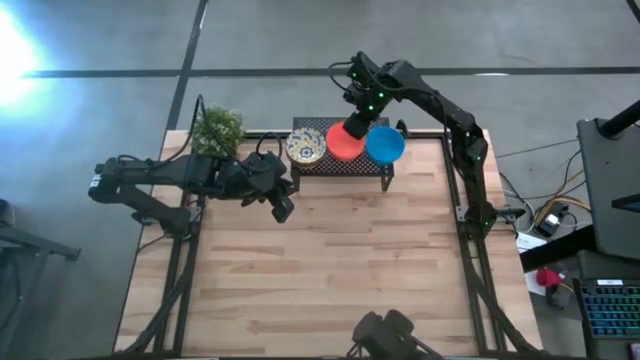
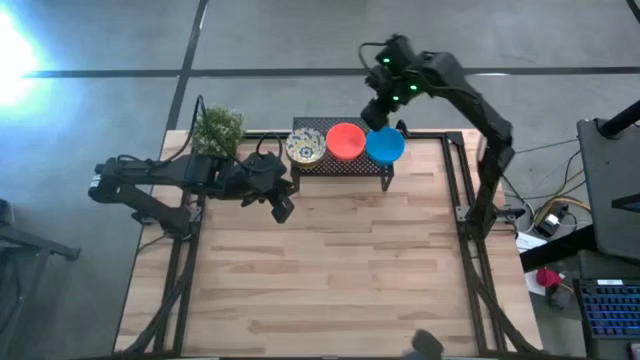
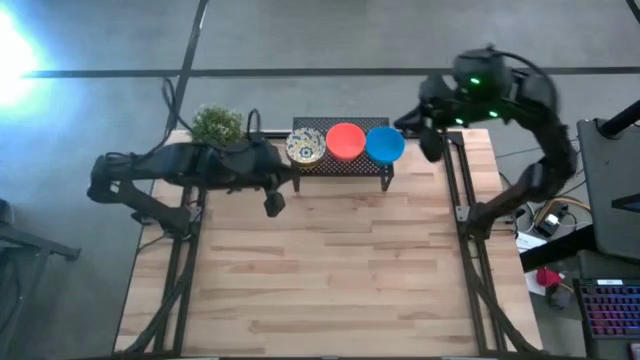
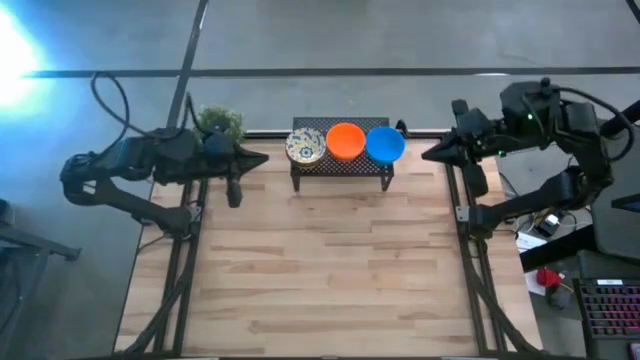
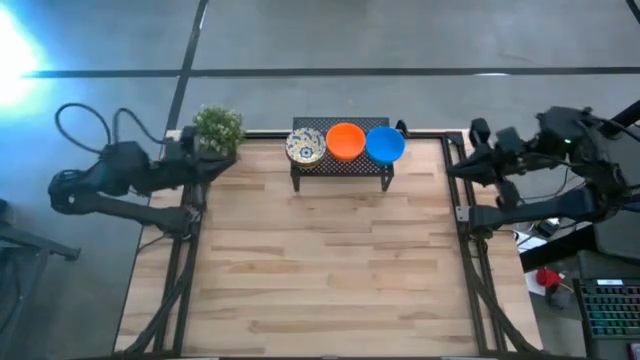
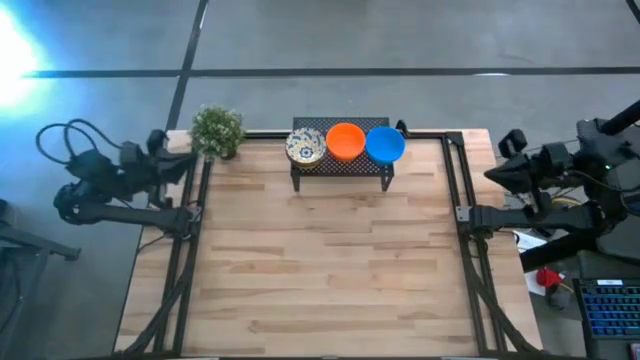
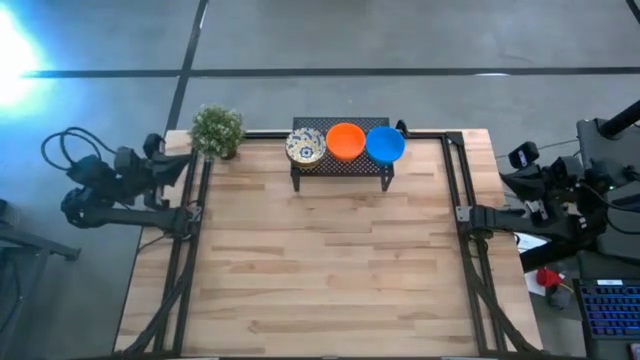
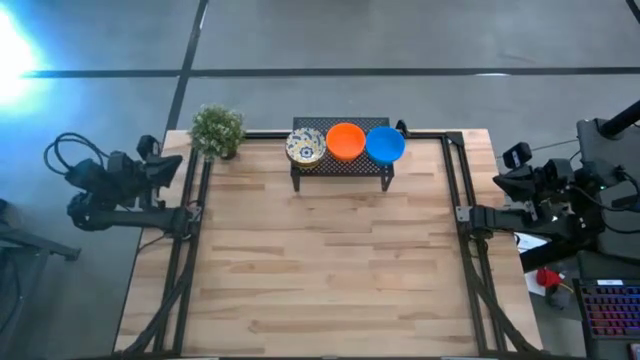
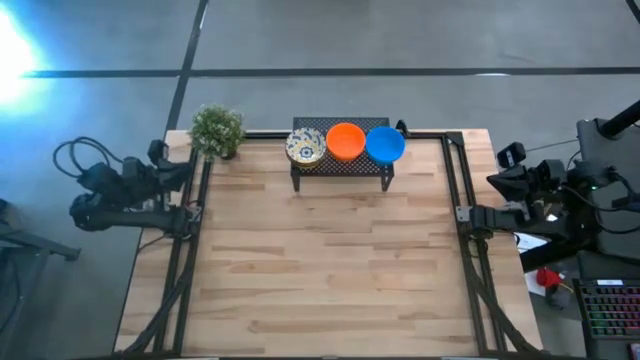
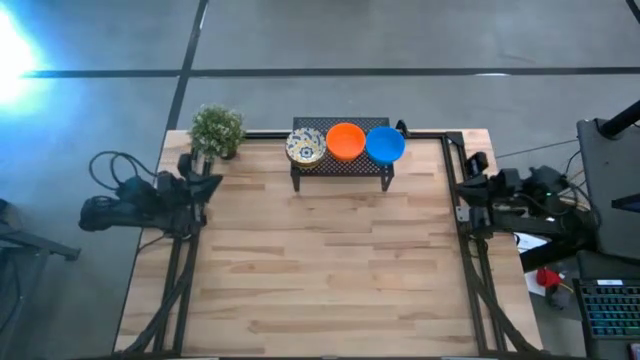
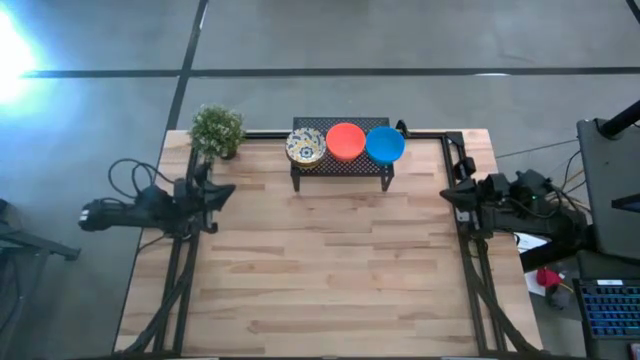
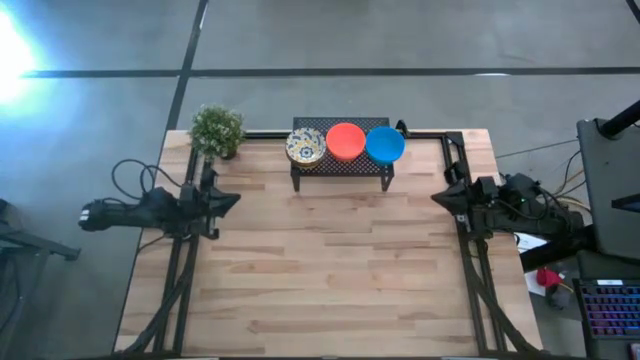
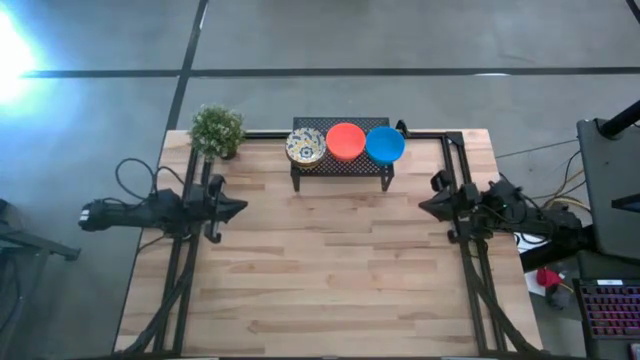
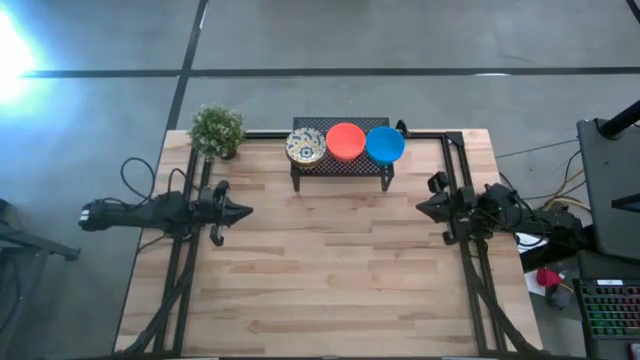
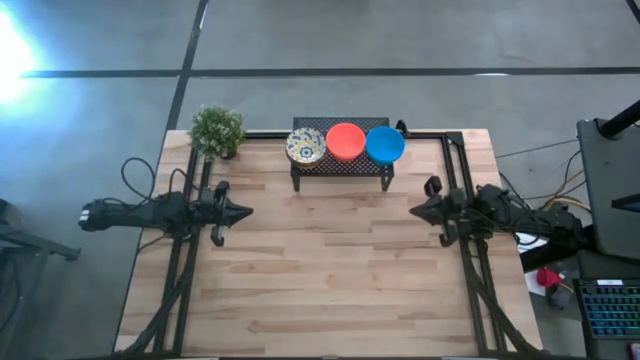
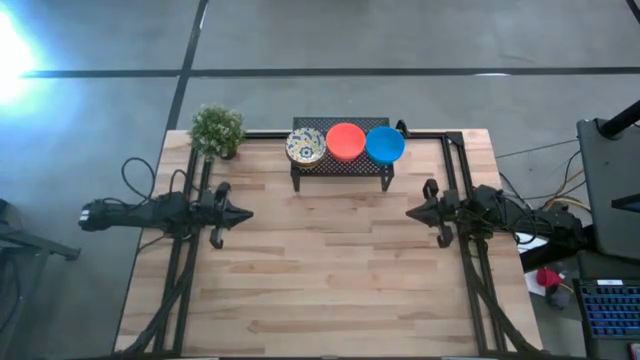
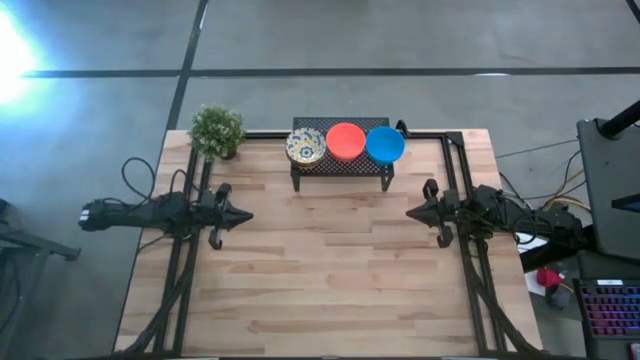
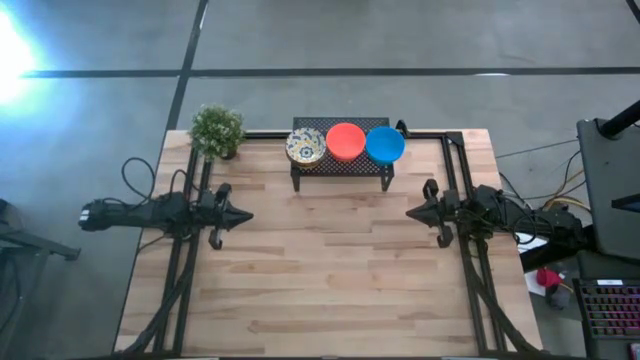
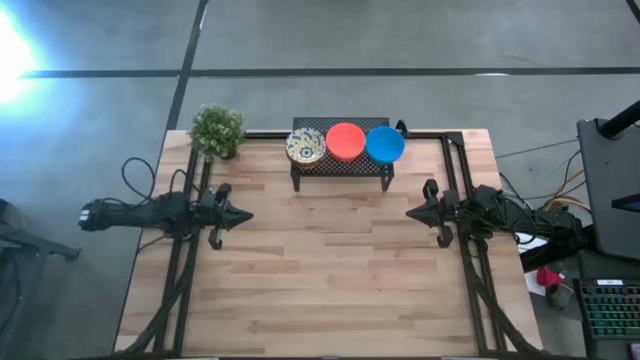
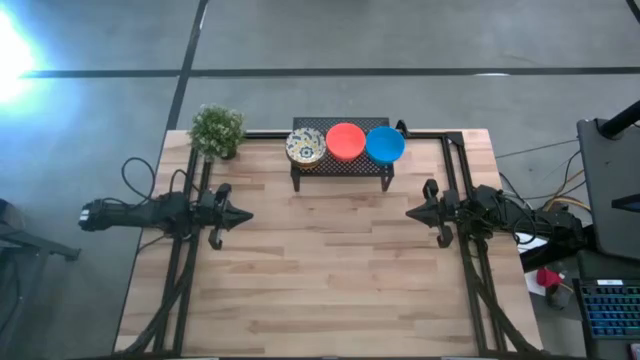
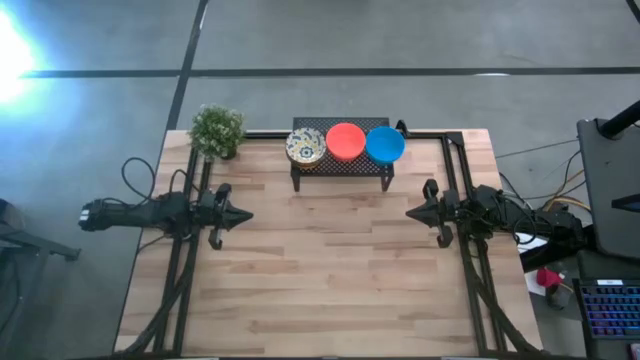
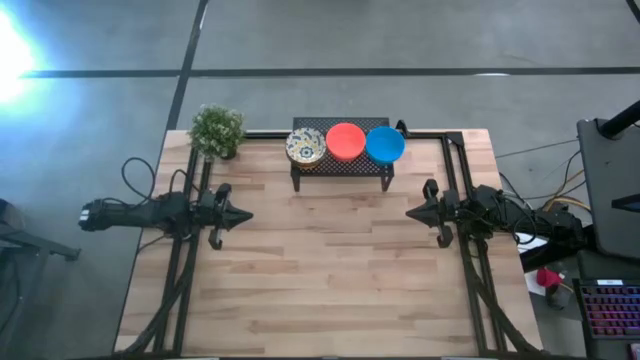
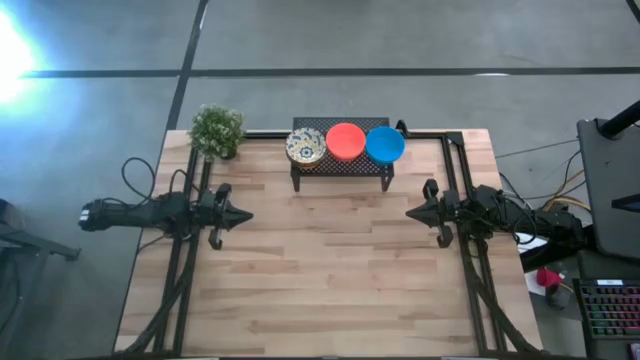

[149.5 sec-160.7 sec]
Task: Pick & Place Mini bowls
Return to Home Position

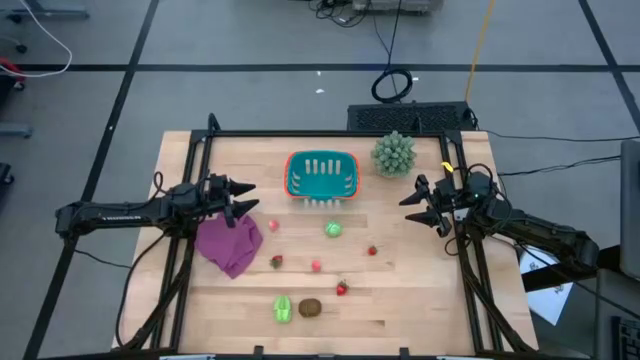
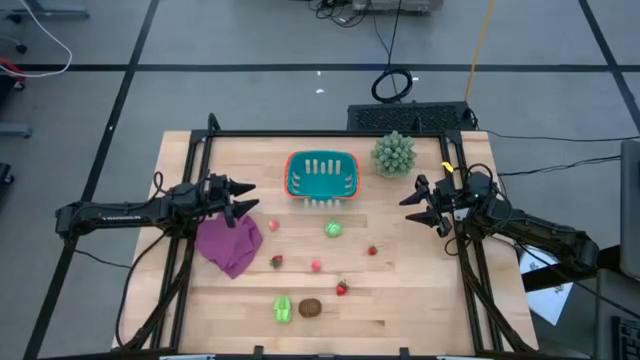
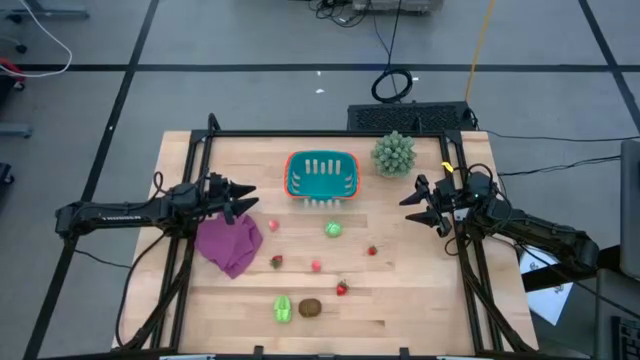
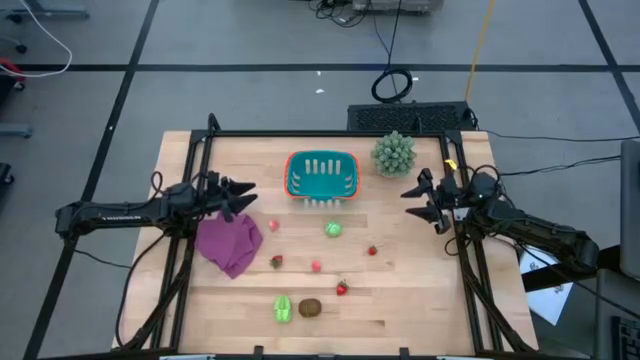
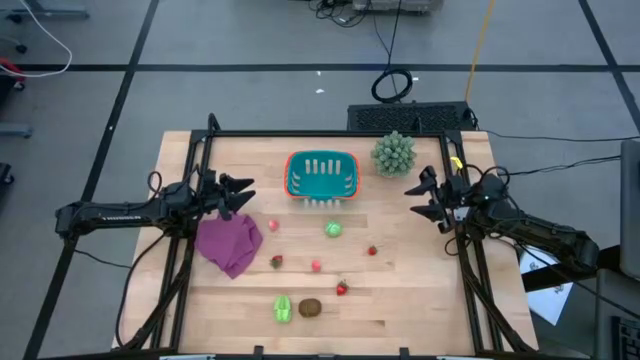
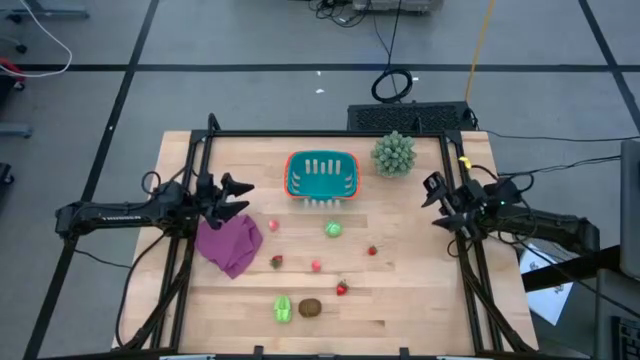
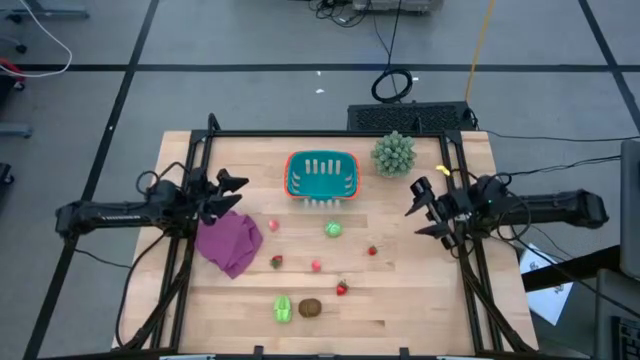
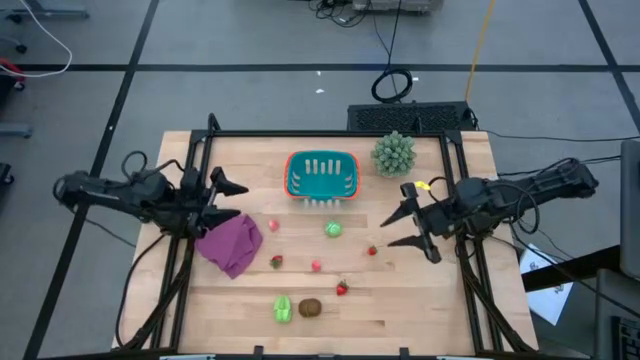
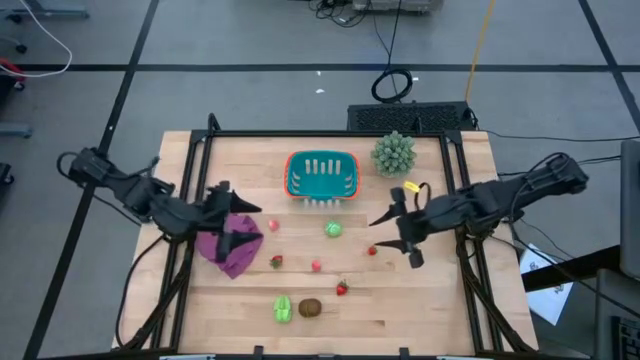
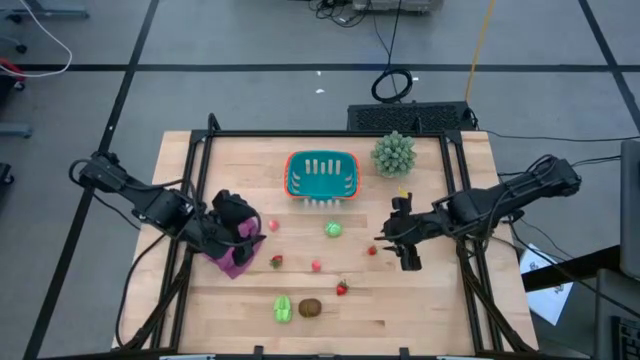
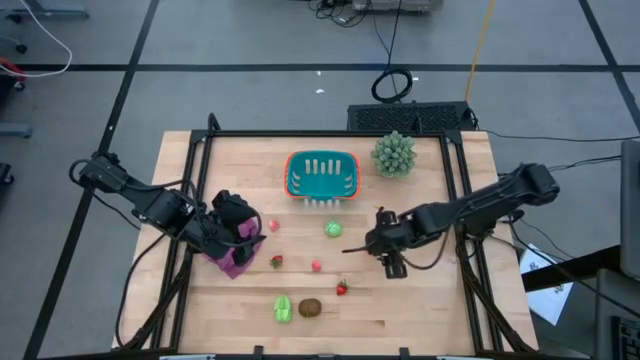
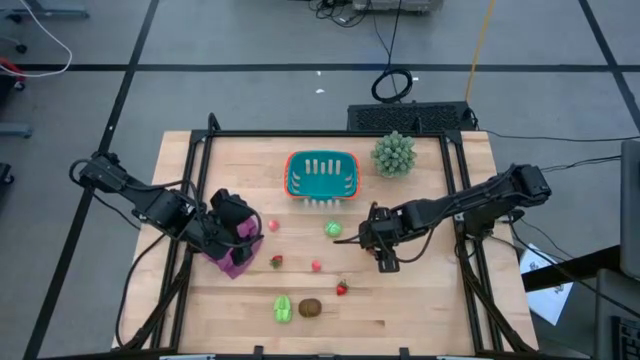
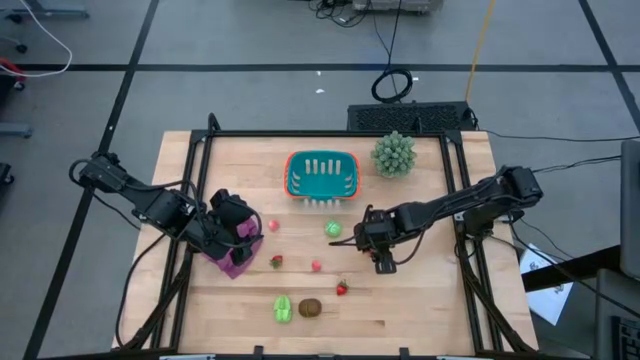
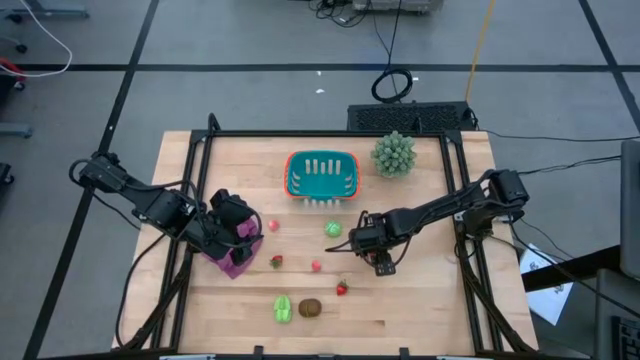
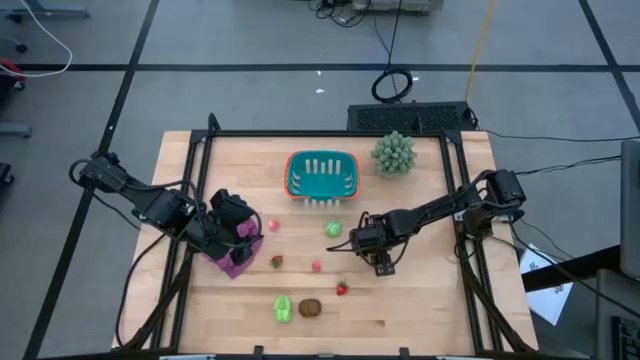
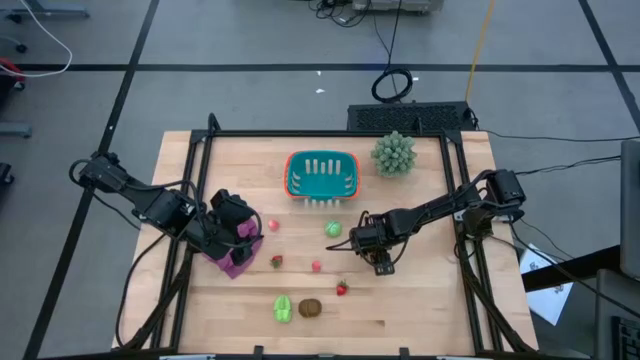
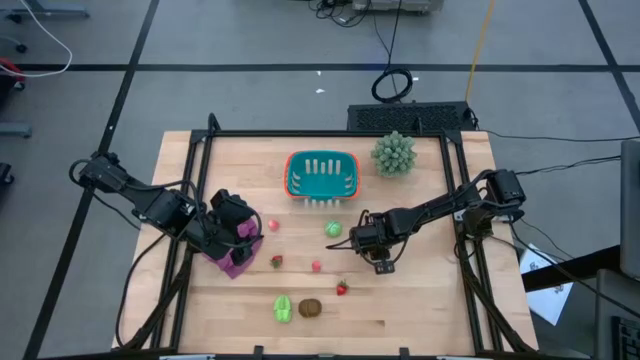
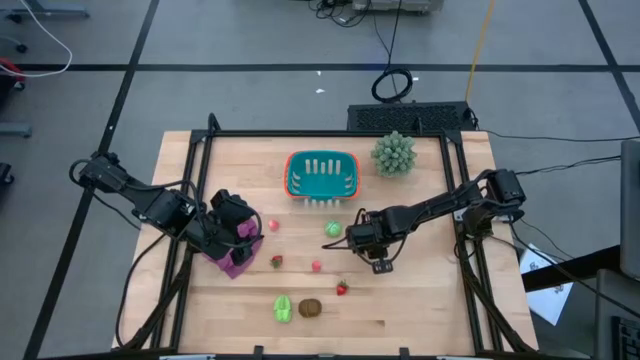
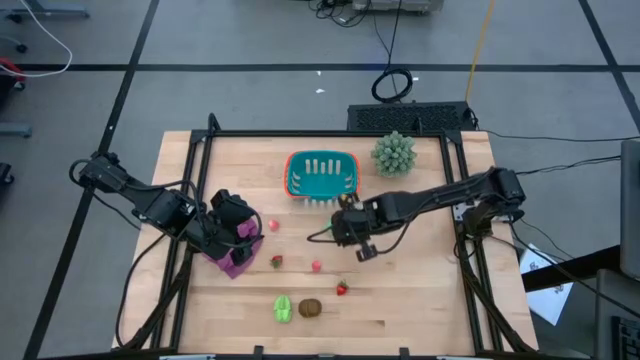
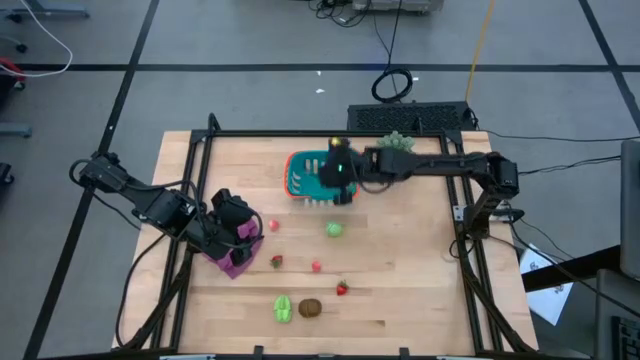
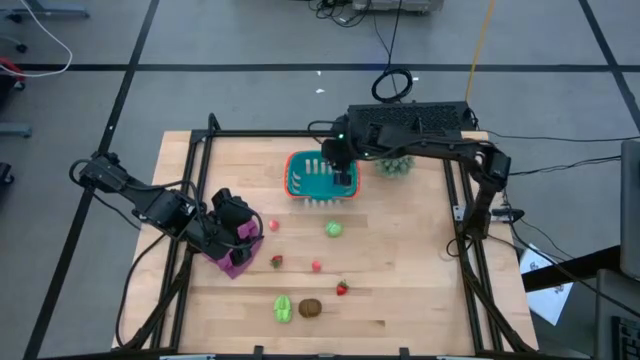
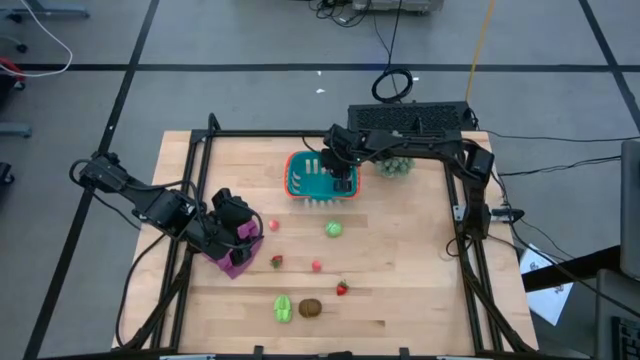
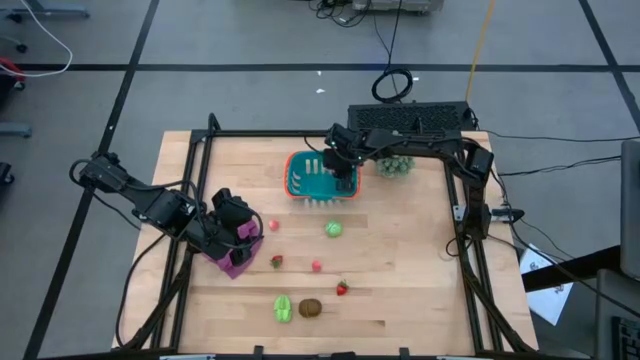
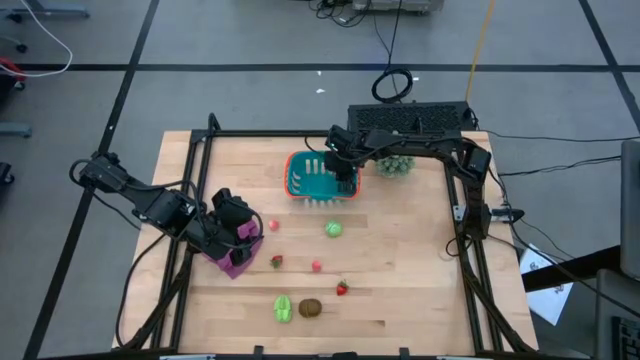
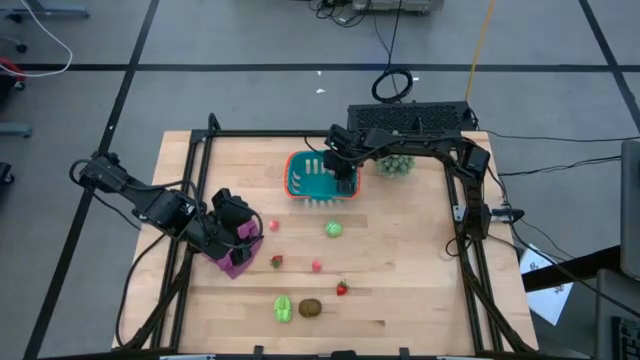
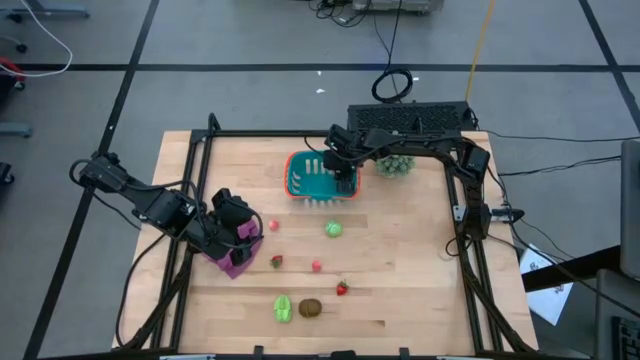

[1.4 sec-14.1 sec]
Task: Pick and placing Produce into tupperware
Put the right strawberry into the blue basket
